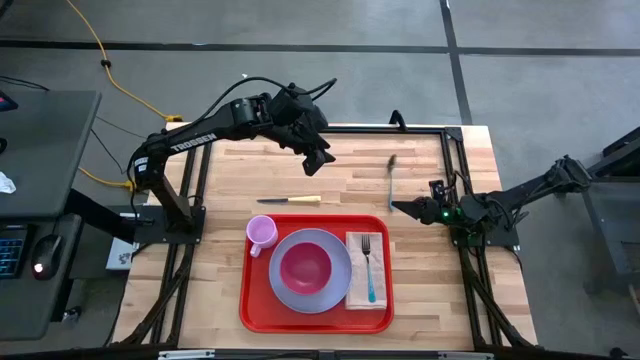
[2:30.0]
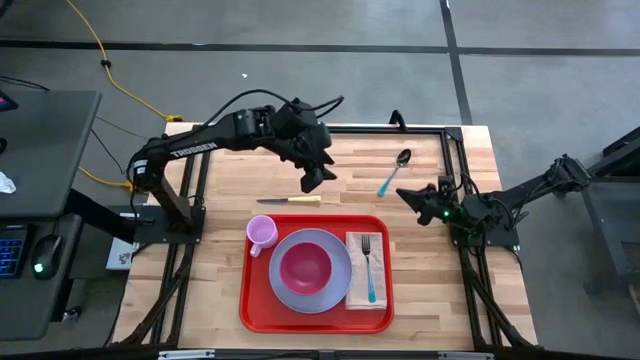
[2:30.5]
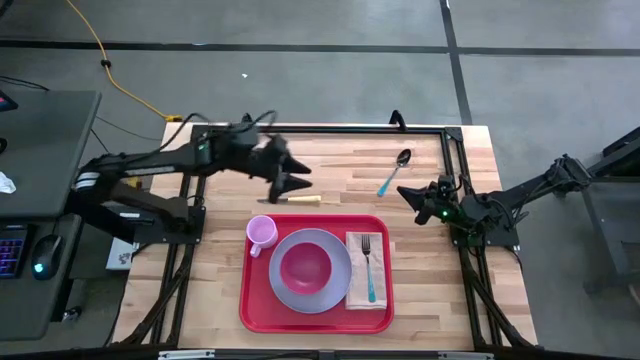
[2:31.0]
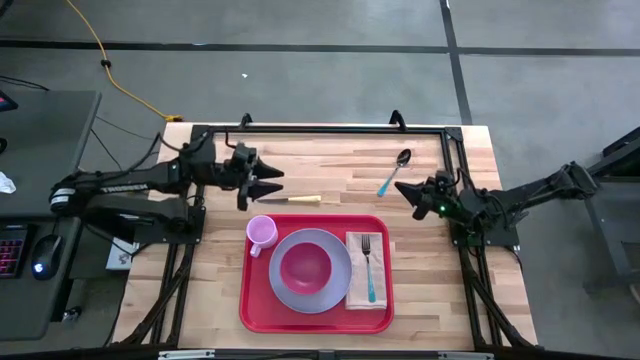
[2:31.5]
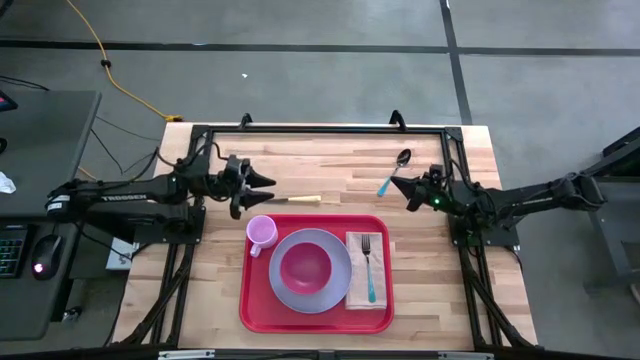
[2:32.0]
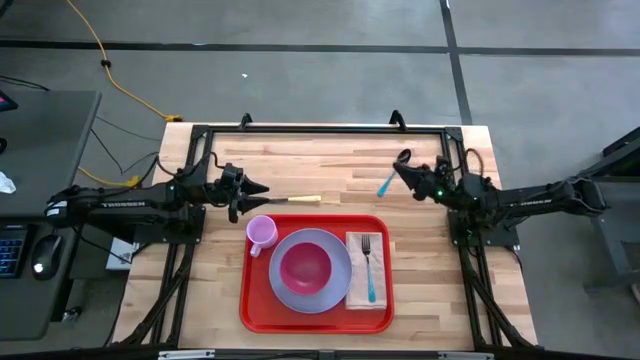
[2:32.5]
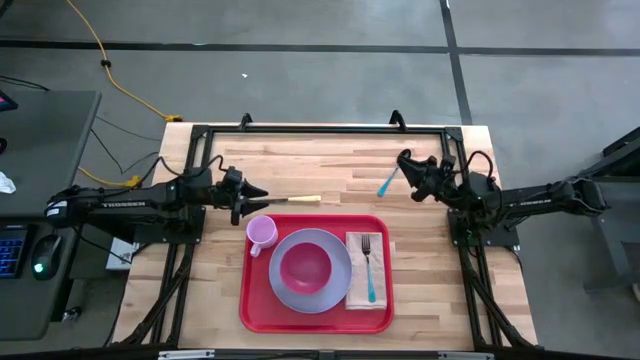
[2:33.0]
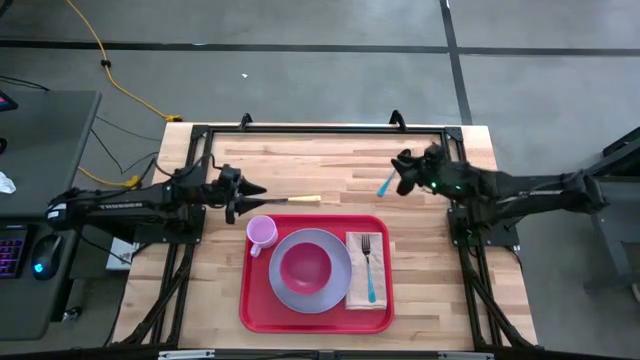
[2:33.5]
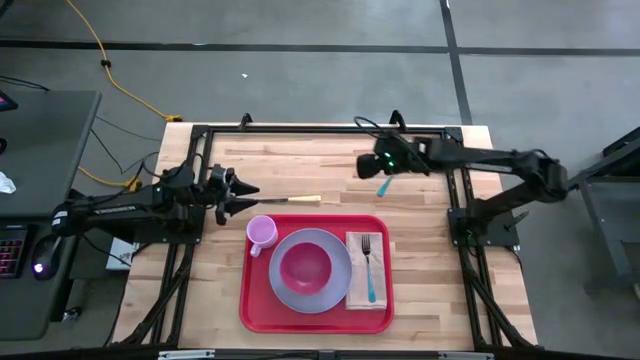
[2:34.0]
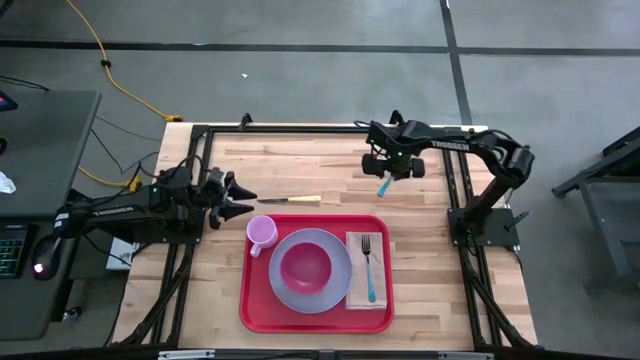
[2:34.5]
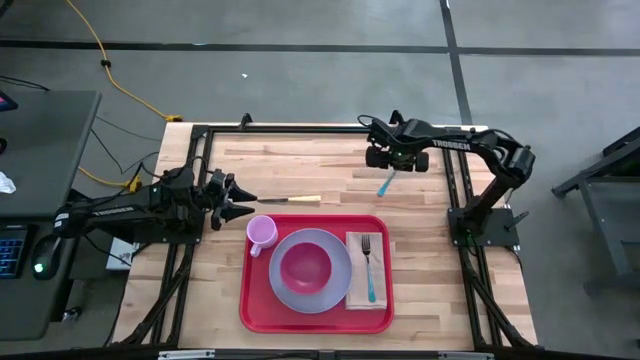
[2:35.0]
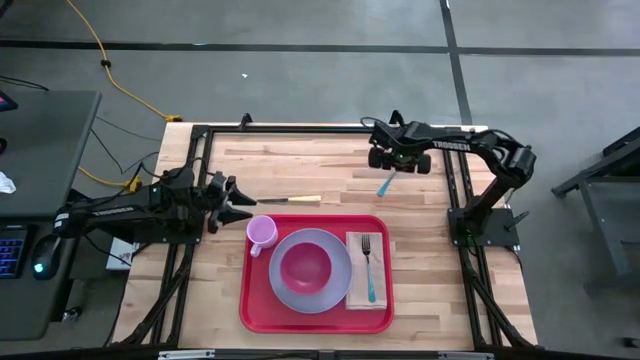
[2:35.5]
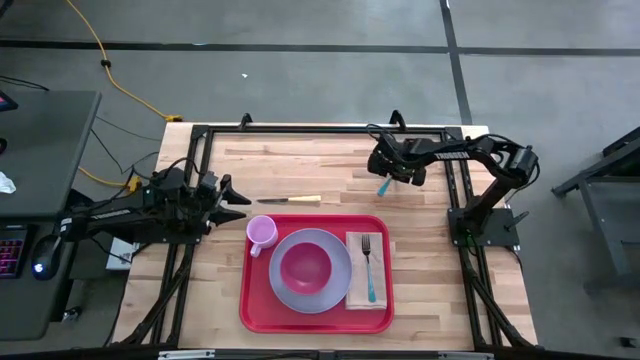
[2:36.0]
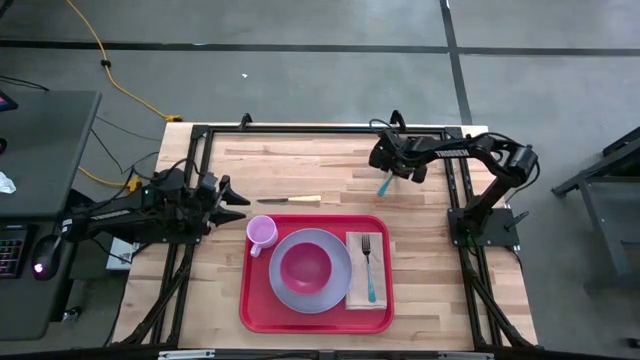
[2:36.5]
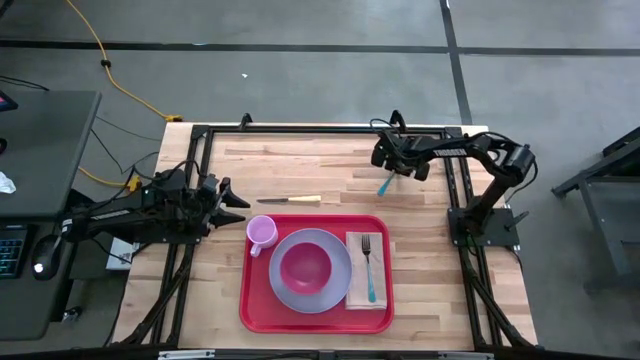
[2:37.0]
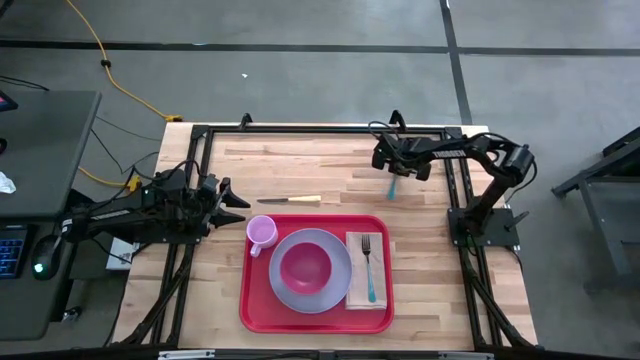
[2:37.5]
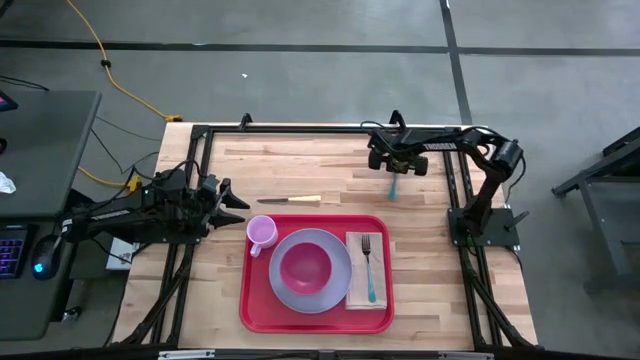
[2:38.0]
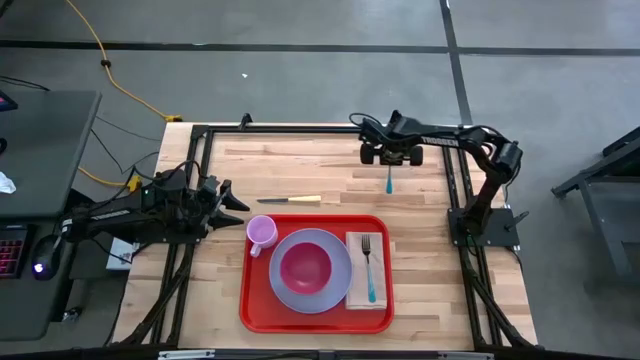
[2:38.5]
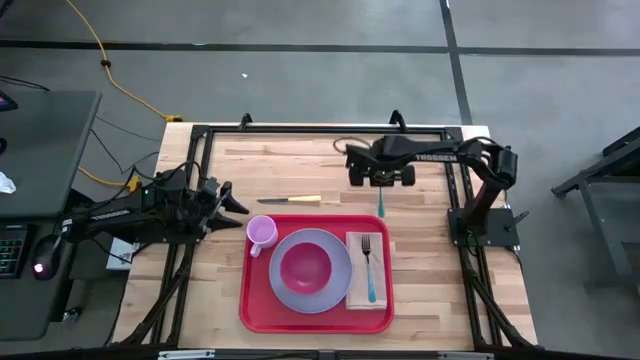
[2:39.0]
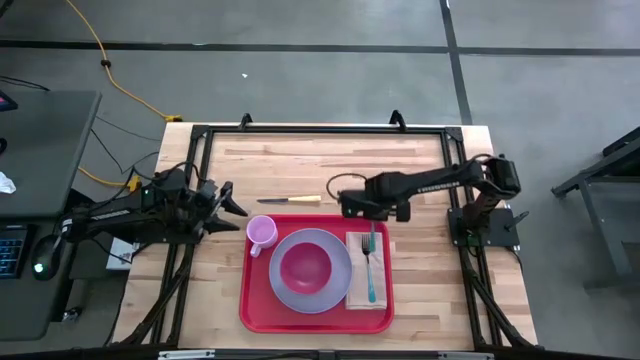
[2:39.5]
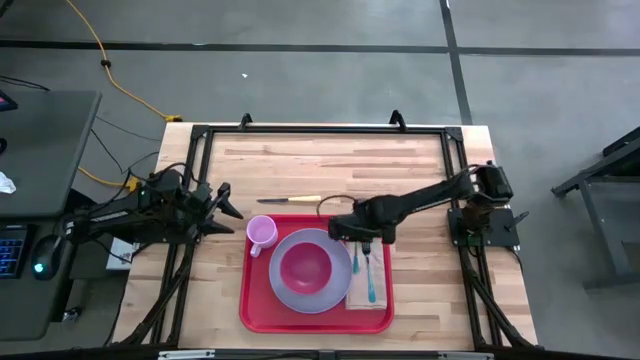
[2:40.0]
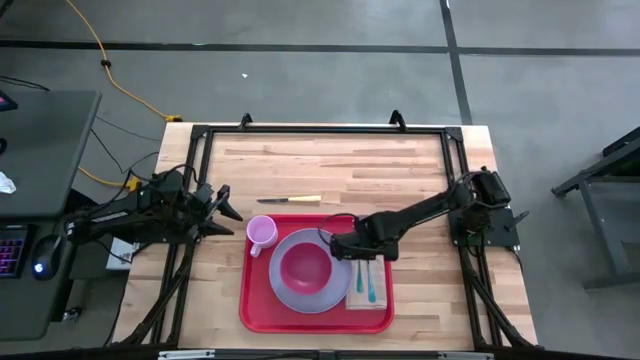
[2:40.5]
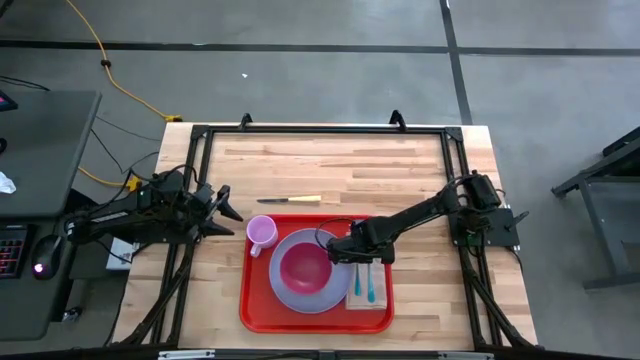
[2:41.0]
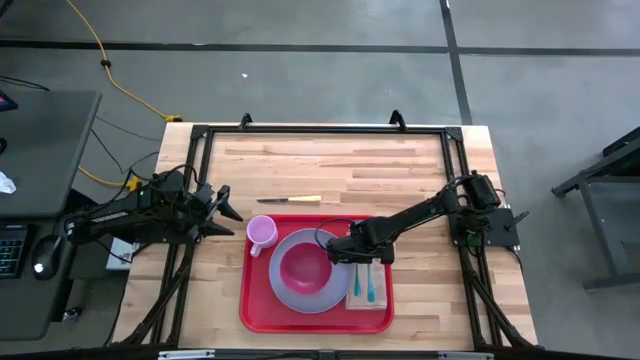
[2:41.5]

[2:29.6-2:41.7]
Task: Set up tray
Put the blue spoon on the brown napkin to the left of the blue fork

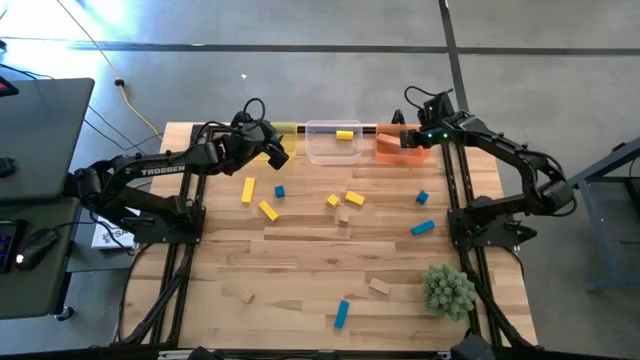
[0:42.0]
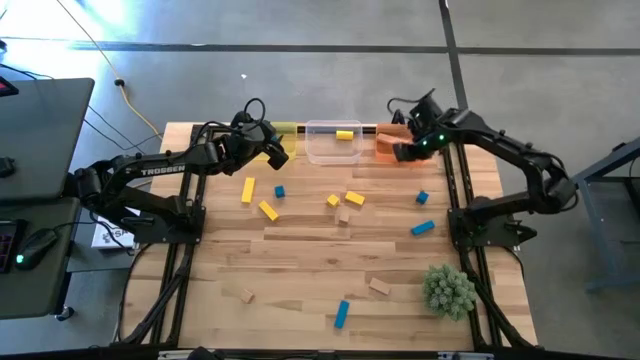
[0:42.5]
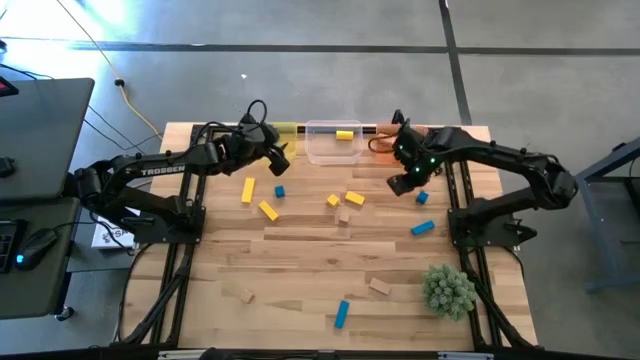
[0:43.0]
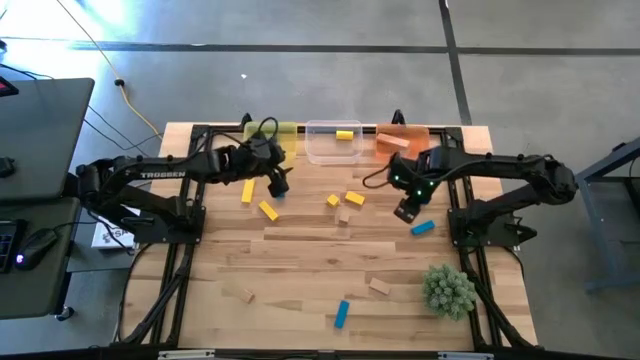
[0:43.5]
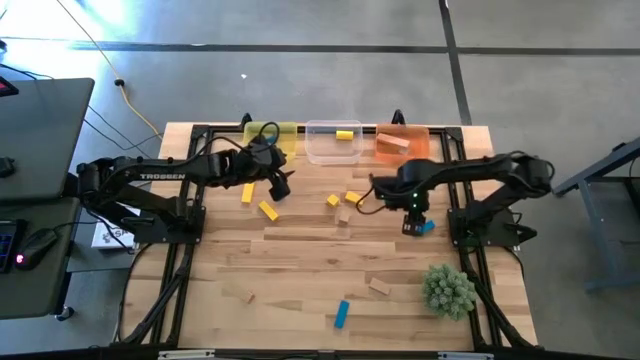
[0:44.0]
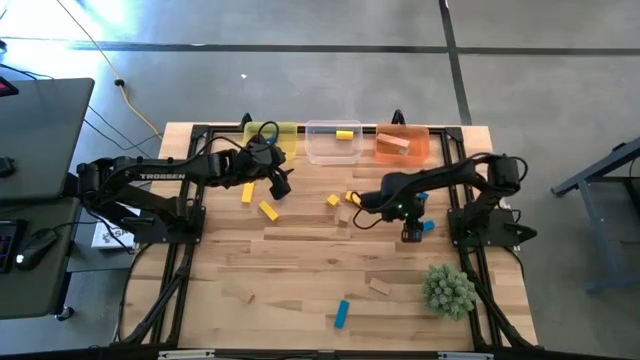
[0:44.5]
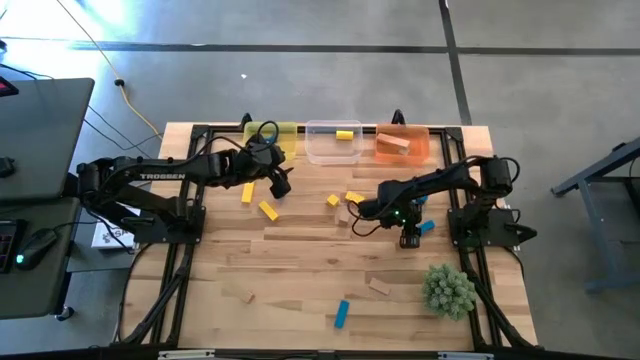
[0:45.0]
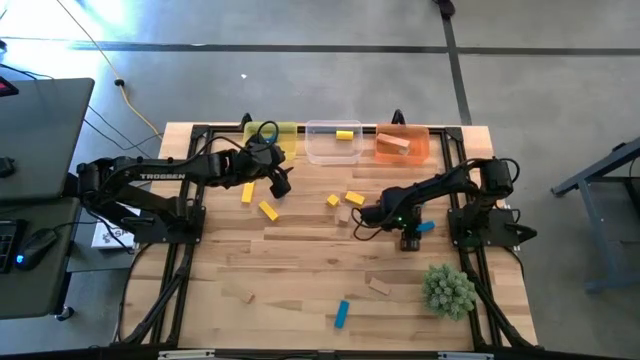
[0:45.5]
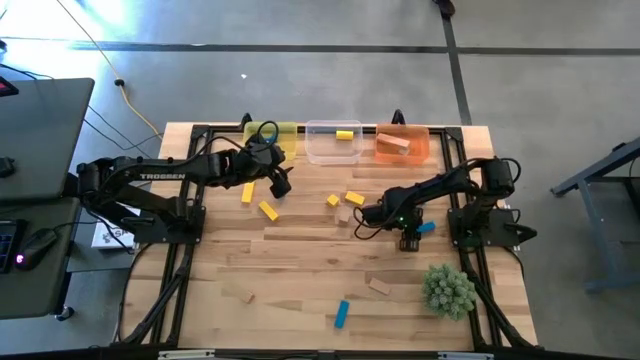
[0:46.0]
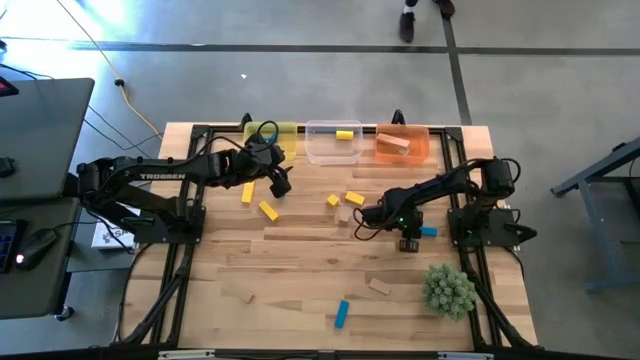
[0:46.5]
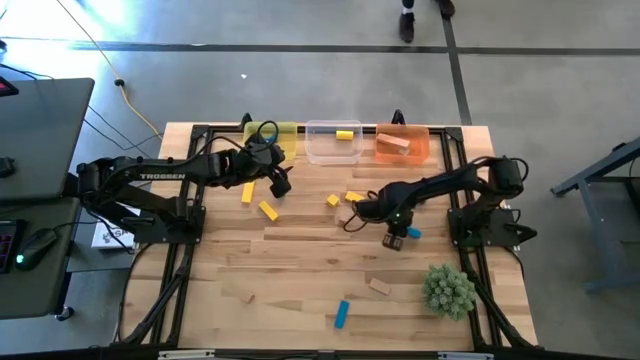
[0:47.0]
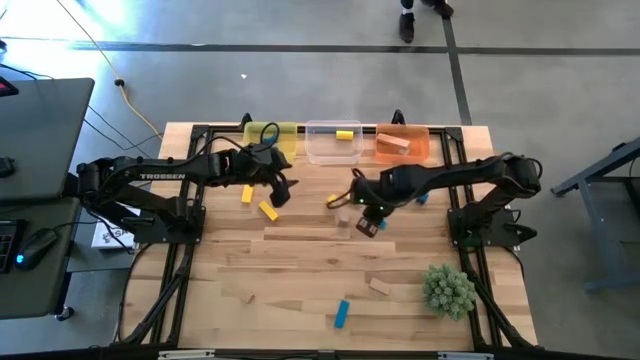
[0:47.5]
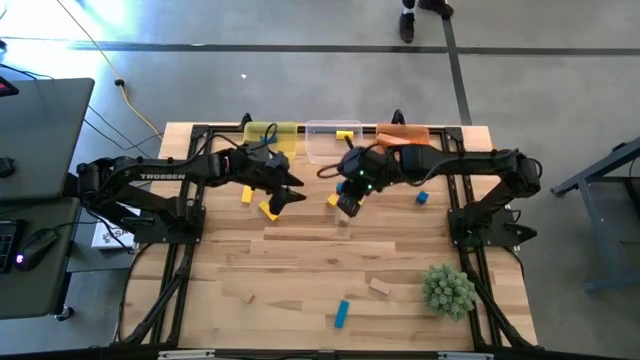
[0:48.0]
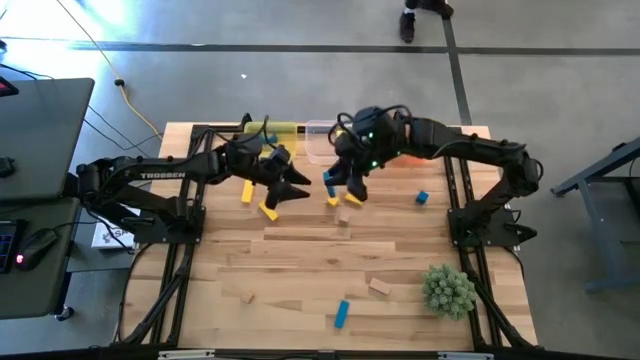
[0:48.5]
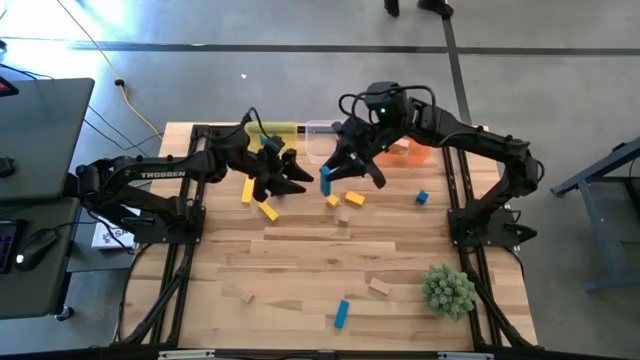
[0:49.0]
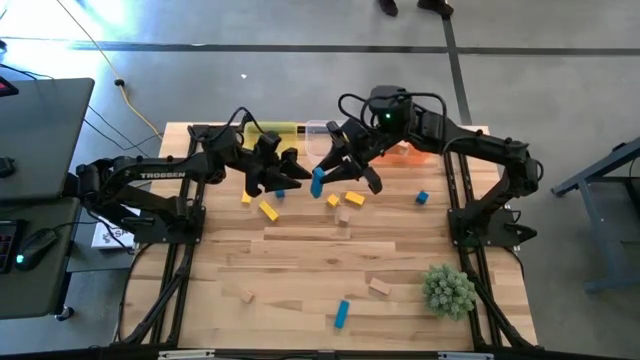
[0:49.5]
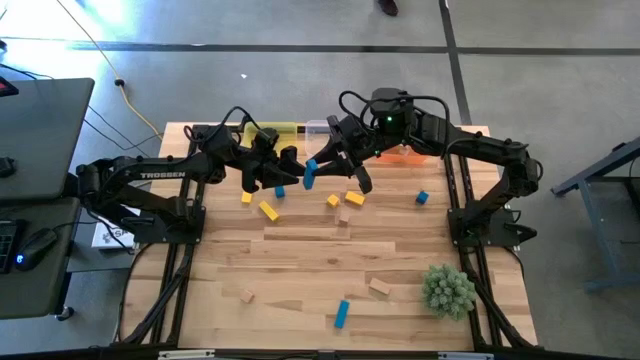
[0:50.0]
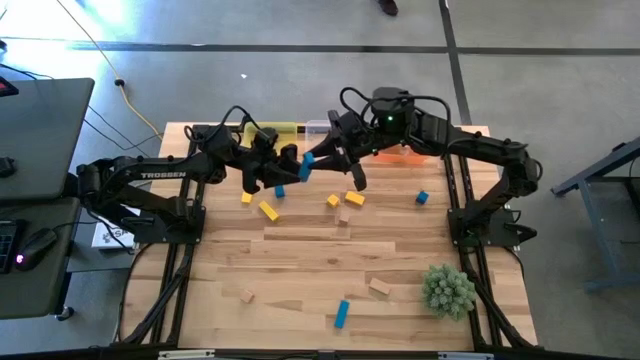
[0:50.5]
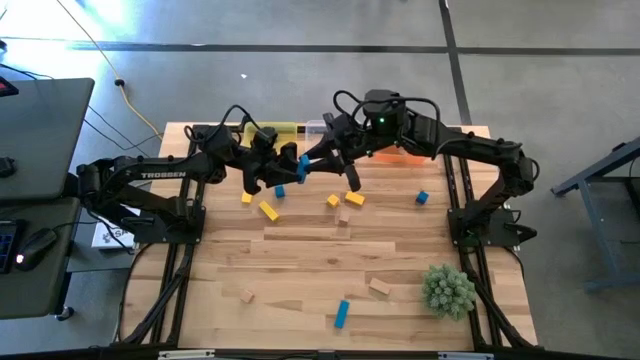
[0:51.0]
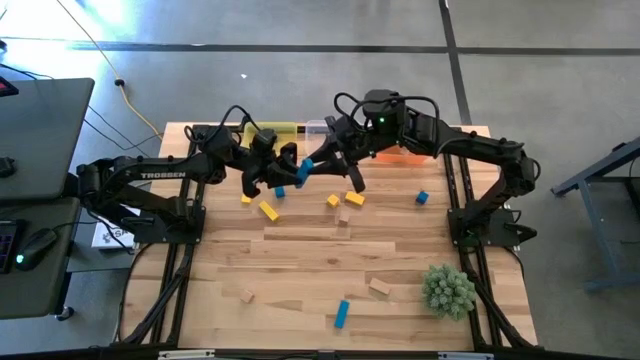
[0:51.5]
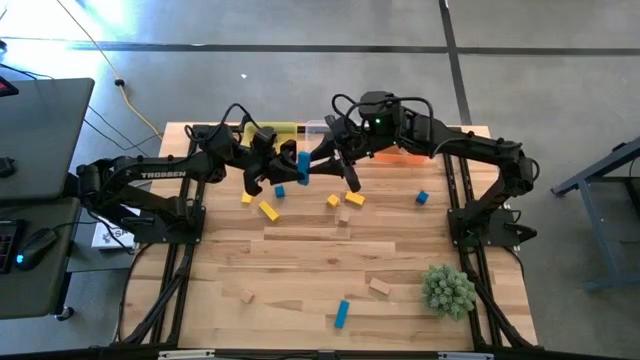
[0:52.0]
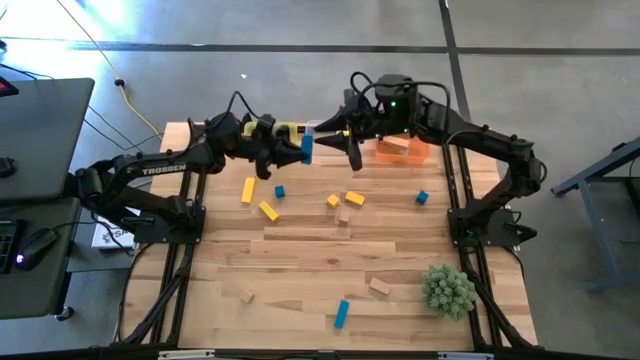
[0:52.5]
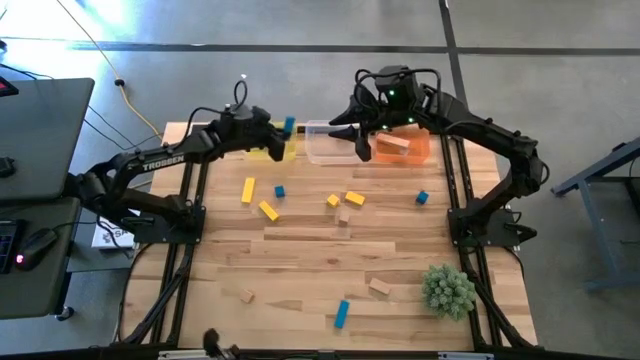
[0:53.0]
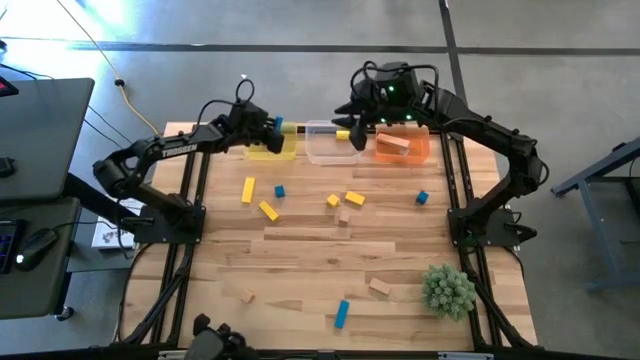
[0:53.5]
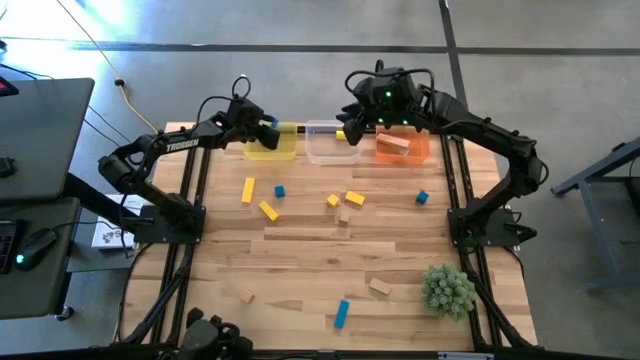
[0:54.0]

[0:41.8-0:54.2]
Task: Sort & place blocks by color
Put the blue block into the yellow bin
